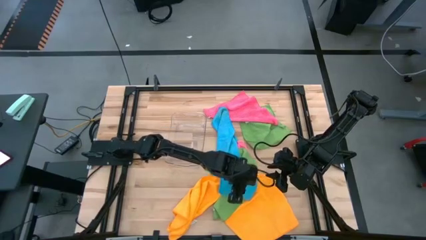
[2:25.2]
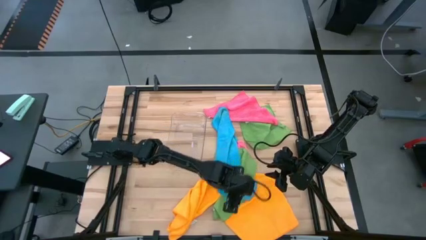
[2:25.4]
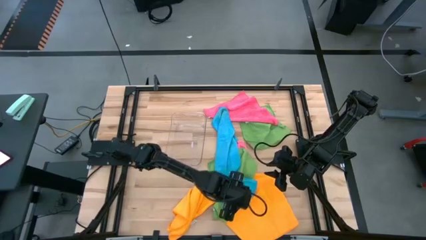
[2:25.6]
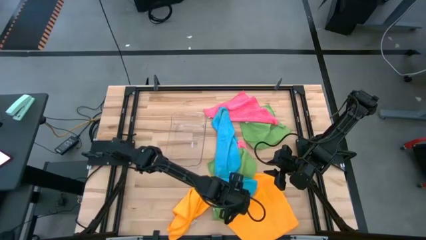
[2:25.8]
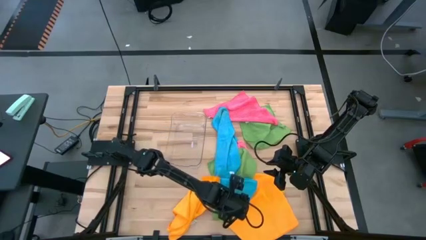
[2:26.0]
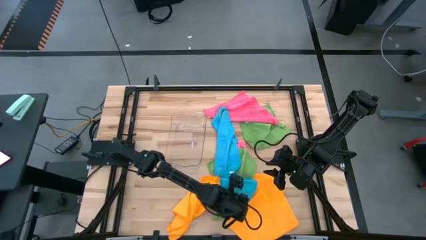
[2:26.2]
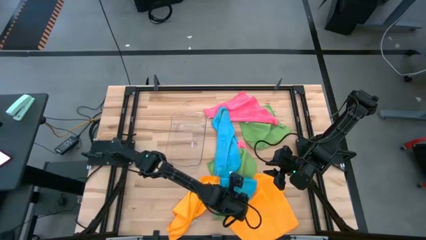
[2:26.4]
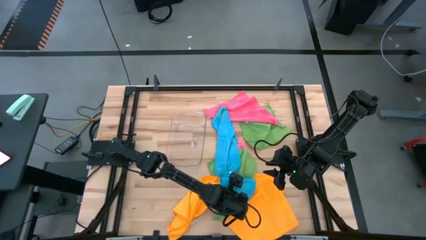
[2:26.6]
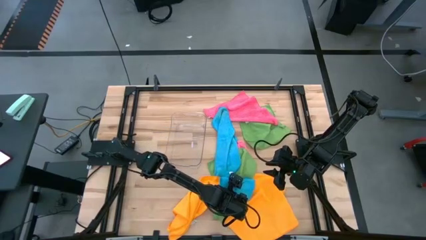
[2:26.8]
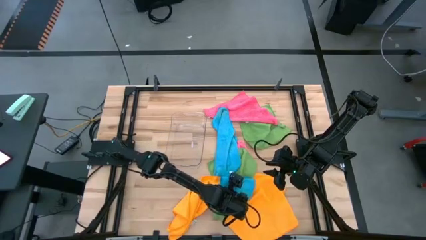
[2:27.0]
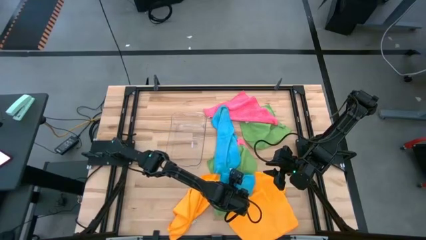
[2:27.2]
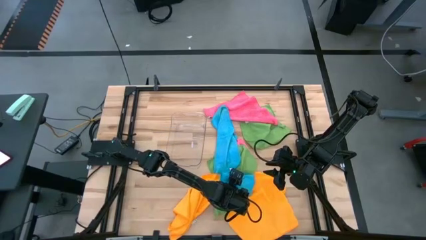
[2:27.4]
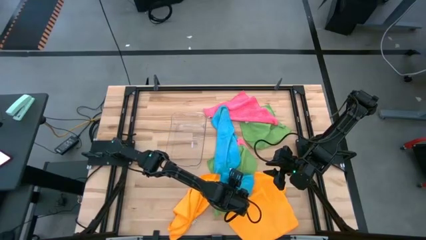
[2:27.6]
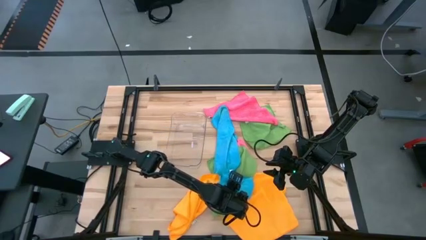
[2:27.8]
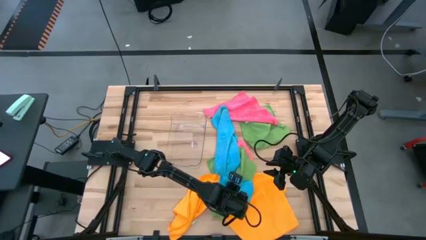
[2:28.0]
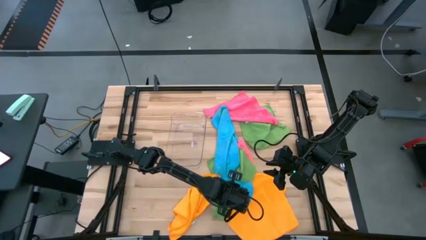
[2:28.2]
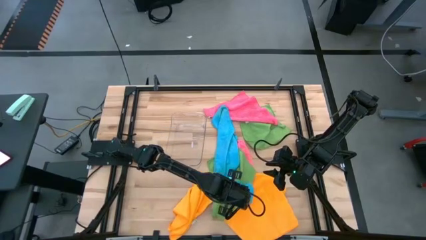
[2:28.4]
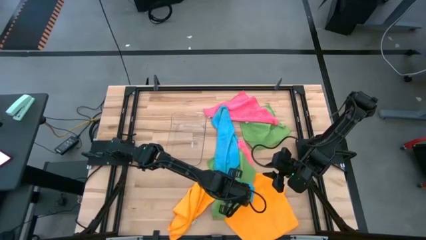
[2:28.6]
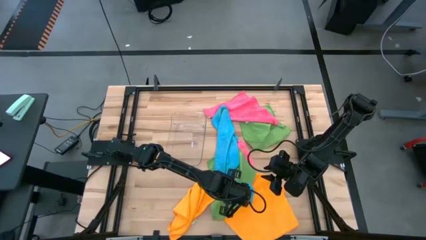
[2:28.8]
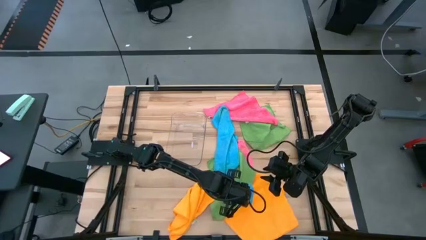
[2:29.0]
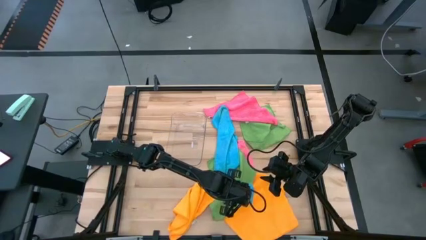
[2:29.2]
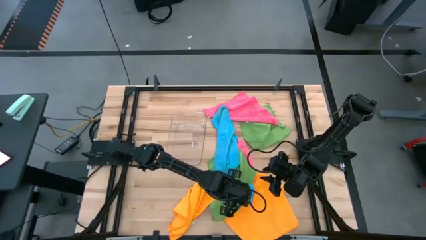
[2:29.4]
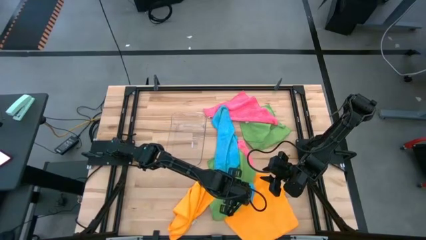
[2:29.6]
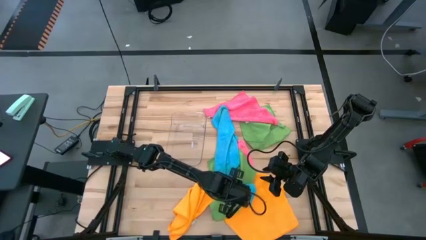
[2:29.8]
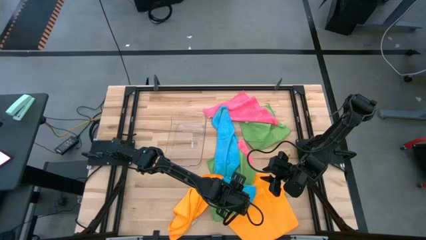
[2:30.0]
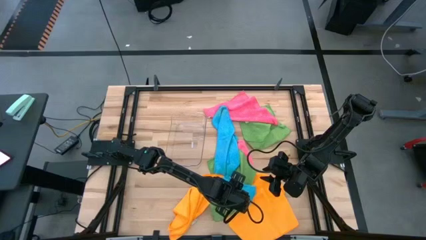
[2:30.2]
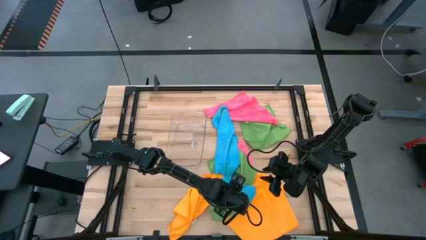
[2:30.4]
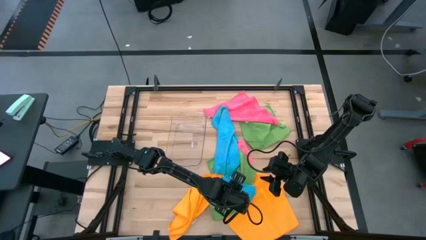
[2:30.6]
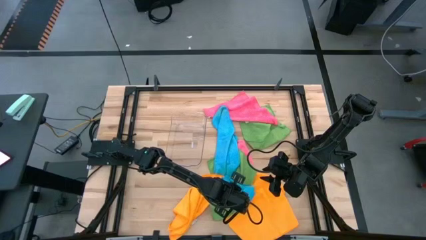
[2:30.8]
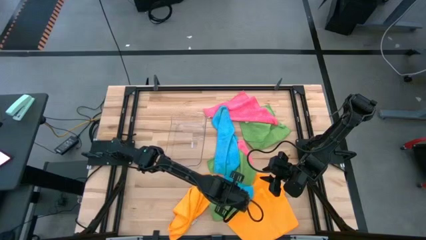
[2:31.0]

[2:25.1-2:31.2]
Task: Fold microfiber towels
Put the left blue towel into the transparent bin
